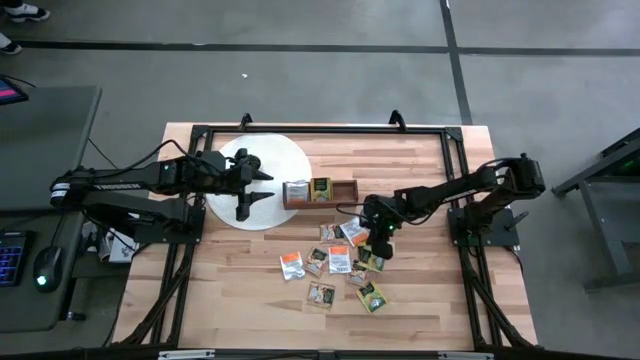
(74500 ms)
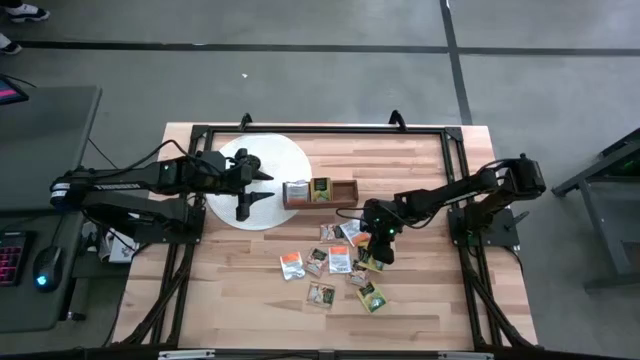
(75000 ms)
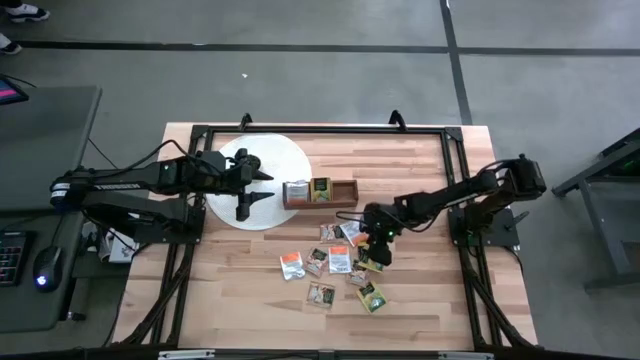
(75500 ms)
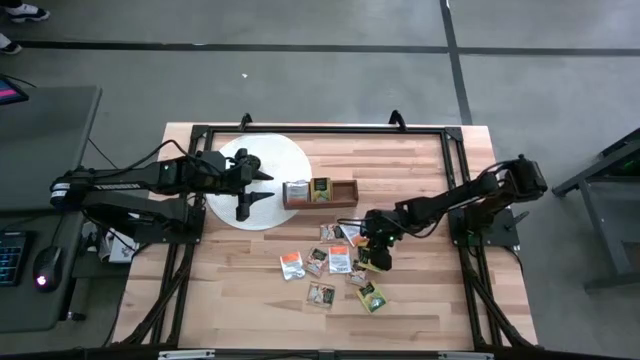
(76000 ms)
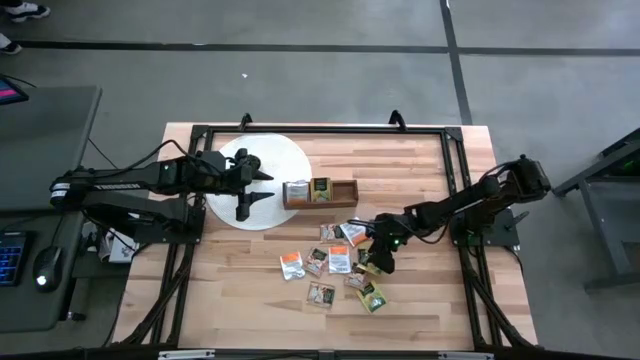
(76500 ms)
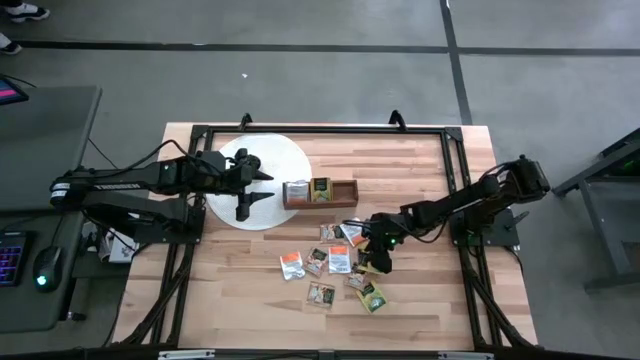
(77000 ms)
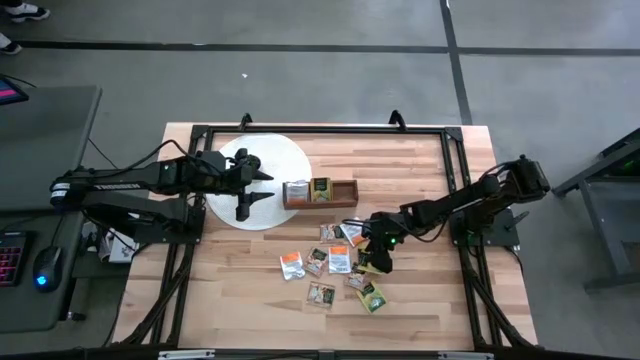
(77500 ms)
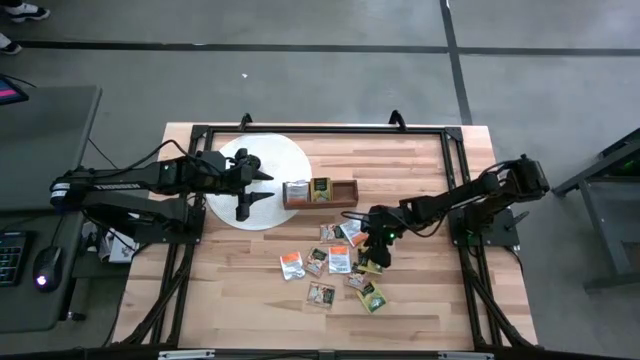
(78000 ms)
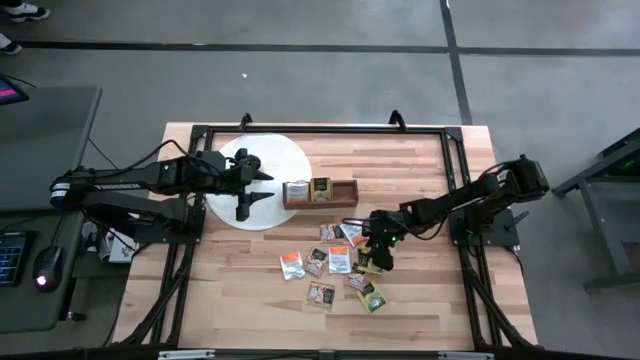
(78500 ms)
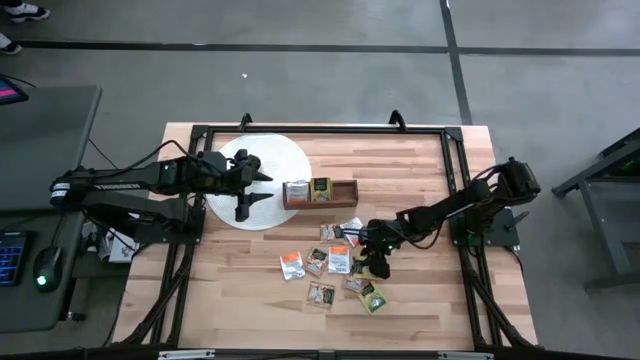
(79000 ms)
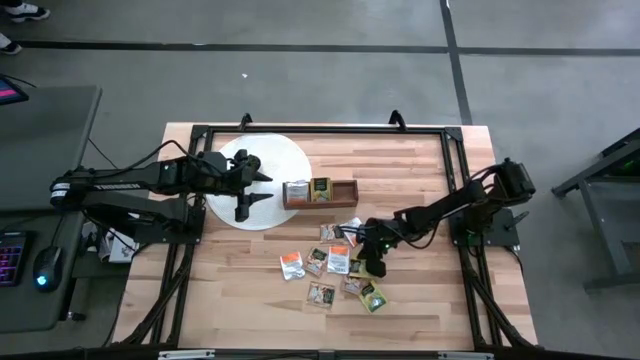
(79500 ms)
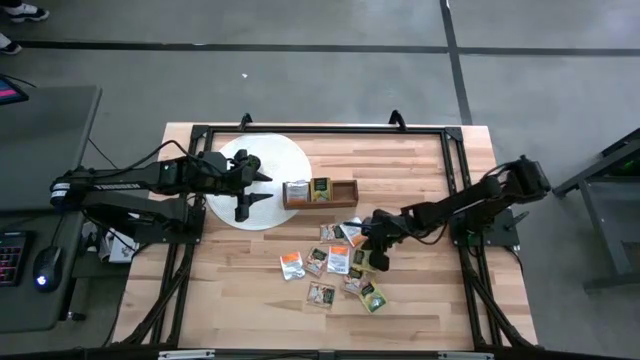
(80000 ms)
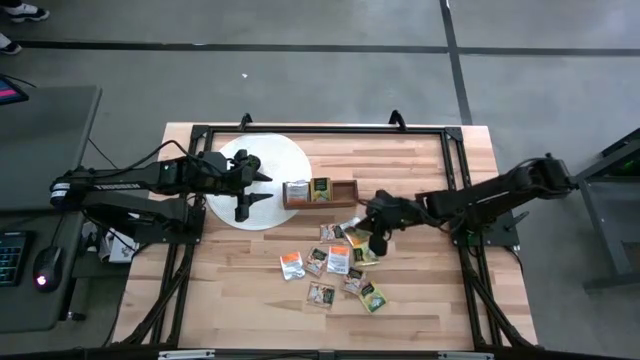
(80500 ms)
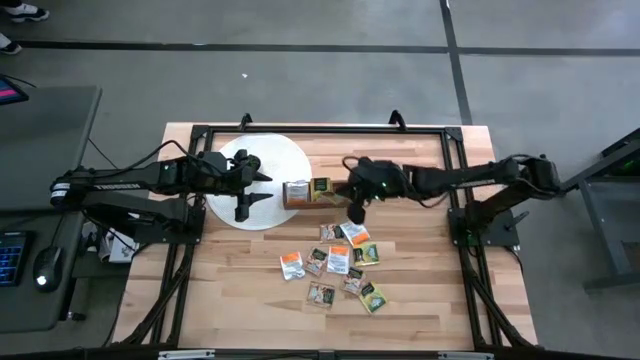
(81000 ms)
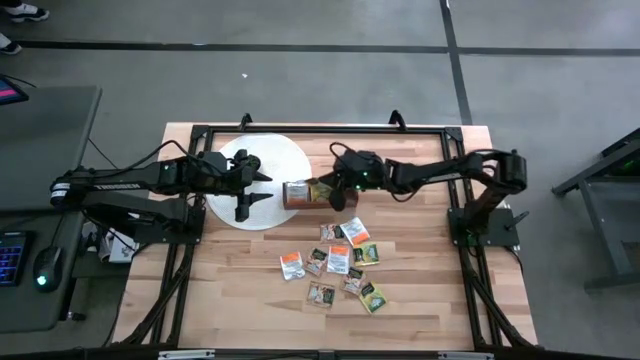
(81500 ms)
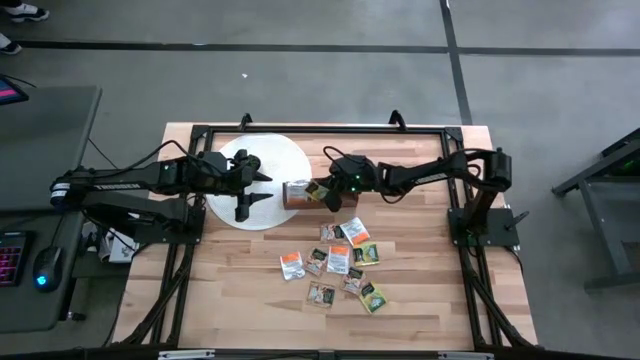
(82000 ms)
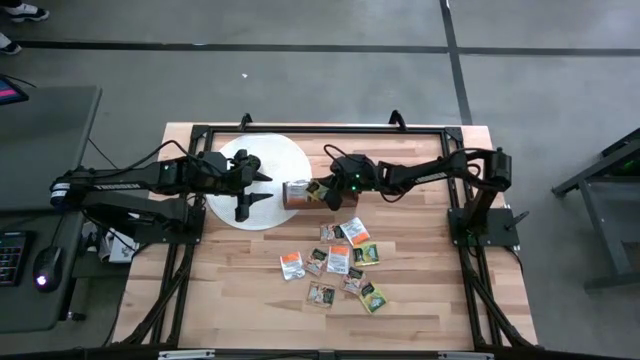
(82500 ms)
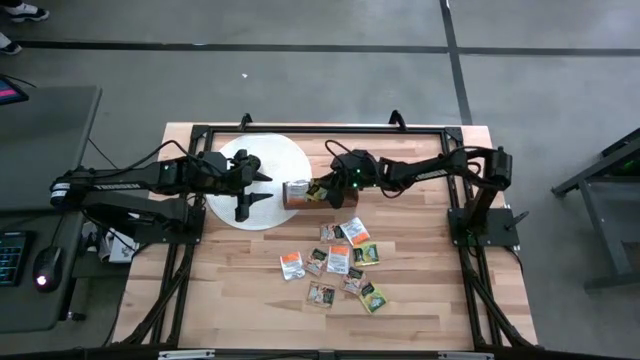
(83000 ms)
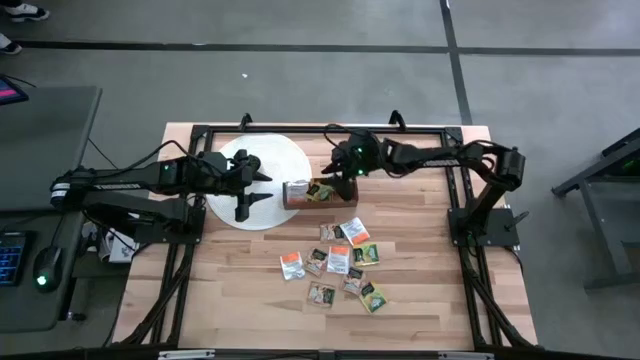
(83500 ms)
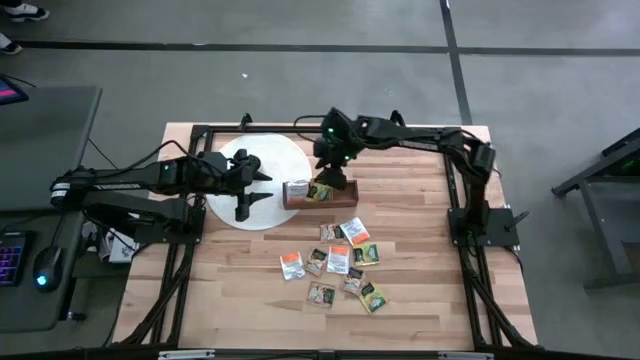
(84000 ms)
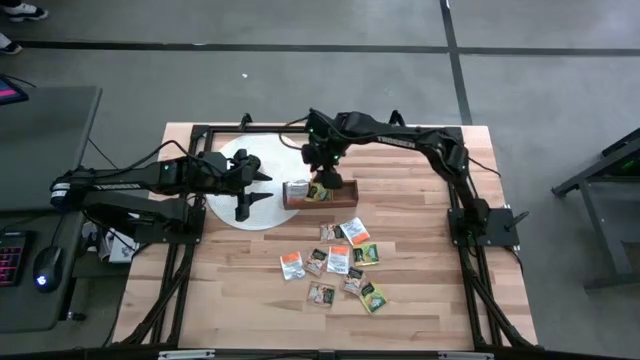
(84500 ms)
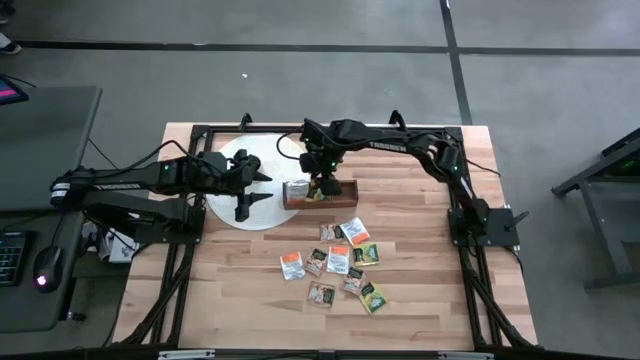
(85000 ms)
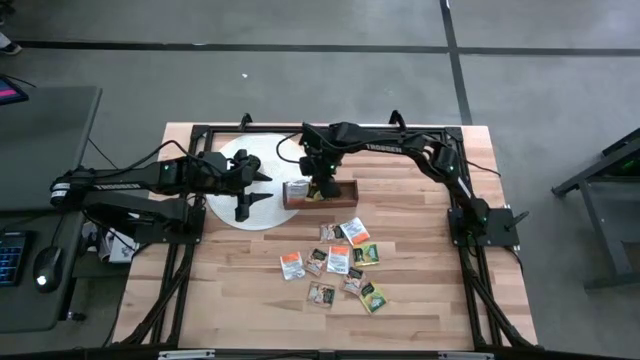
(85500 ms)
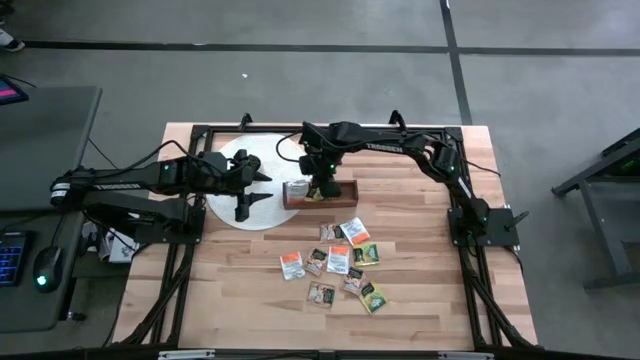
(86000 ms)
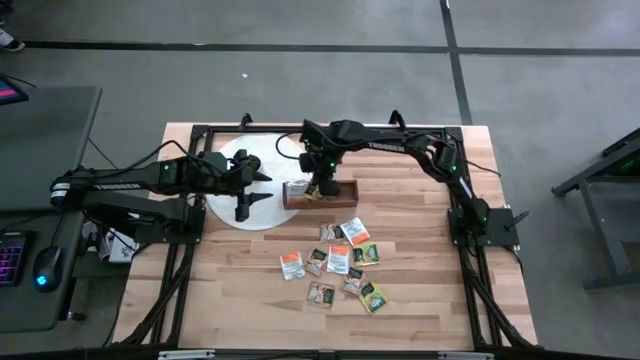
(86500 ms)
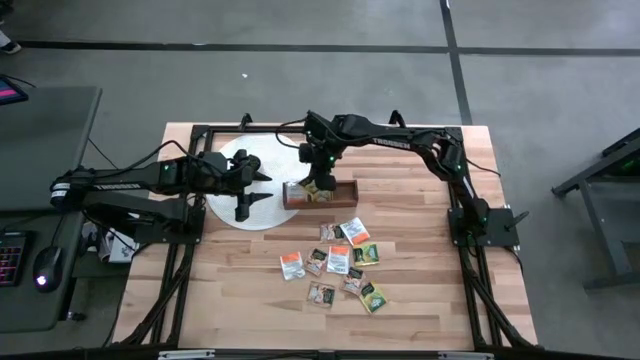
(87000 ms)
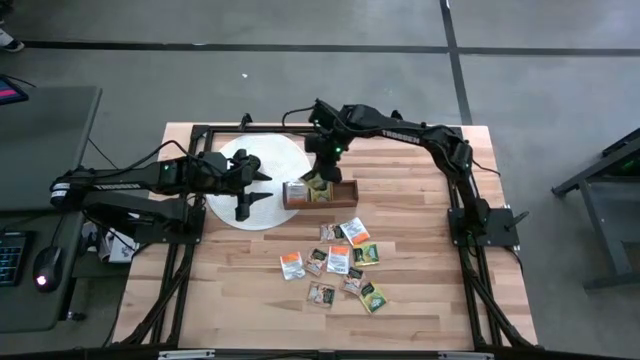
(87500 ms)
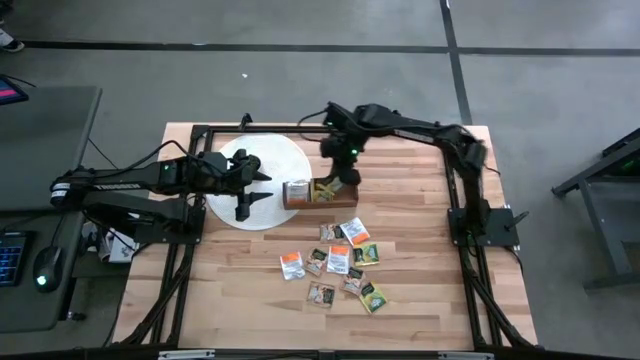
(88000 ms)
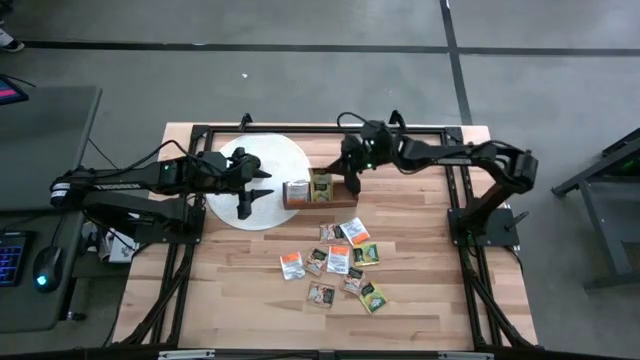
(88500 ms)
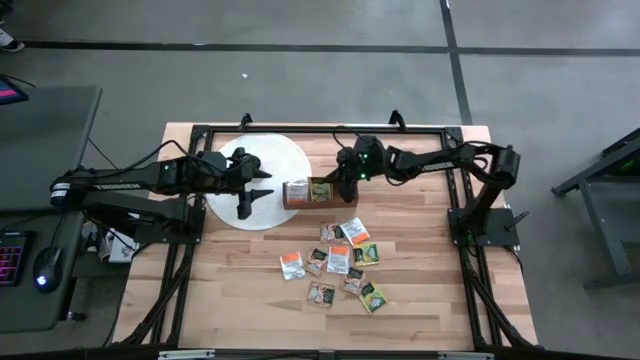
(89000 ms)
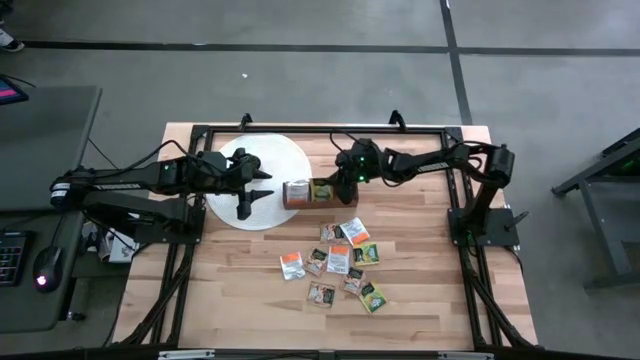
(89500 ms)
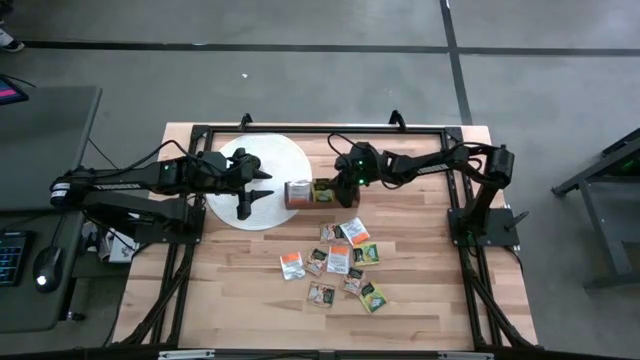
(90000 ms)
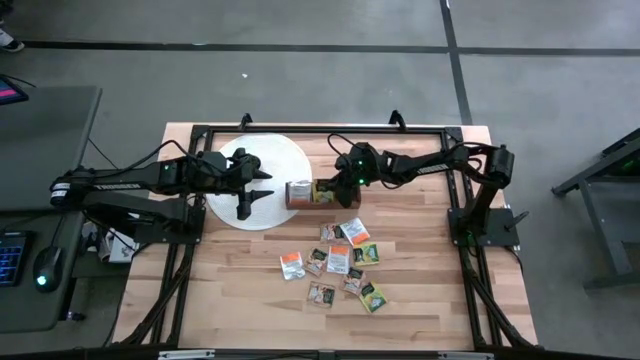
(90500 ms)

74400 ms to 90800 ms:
Task: Pick & Place Tea
Put the yellow tea bag into the middle section of the wooden organizer

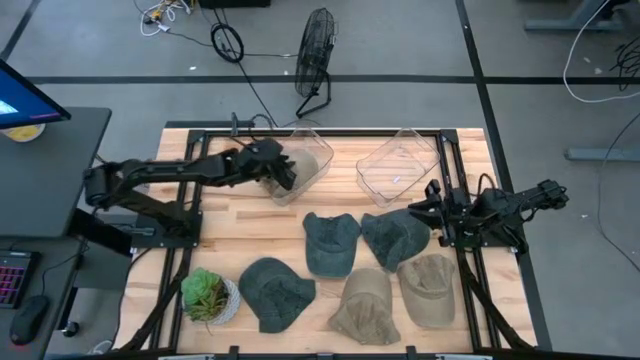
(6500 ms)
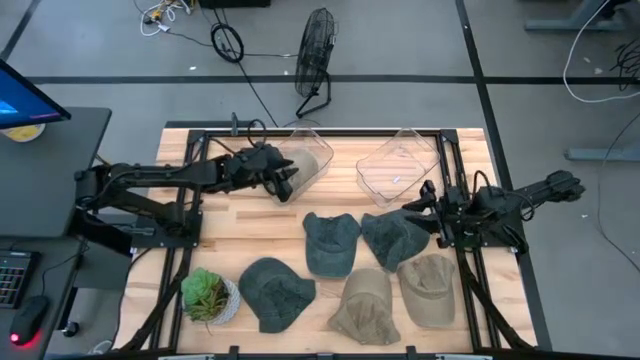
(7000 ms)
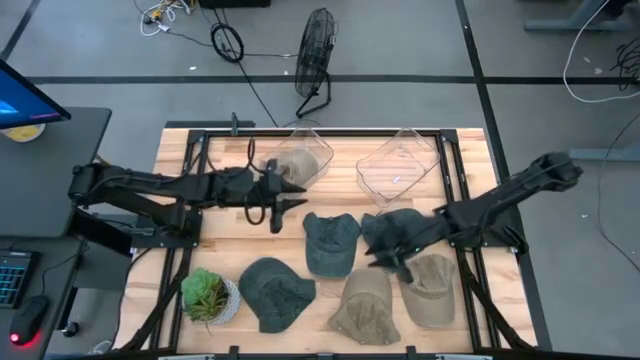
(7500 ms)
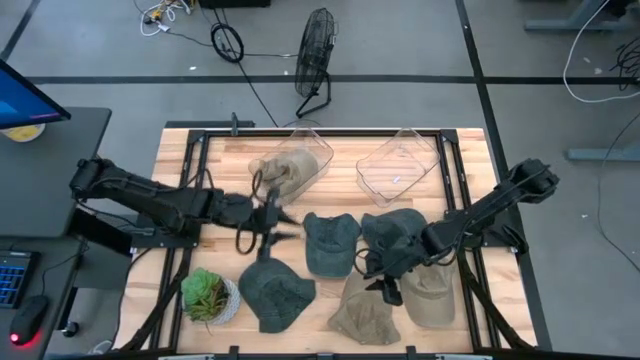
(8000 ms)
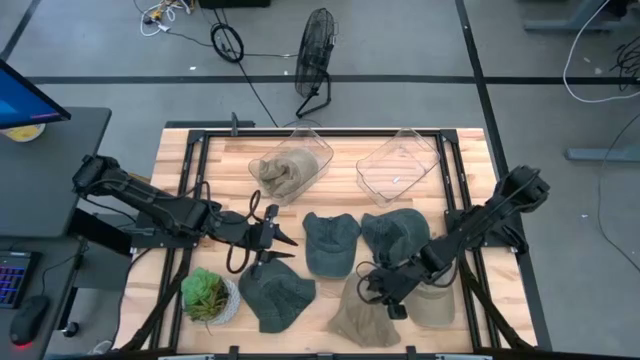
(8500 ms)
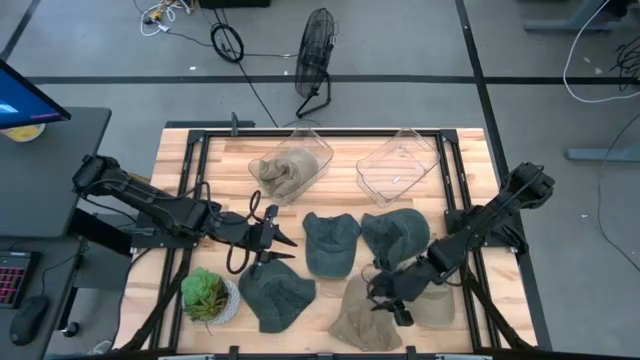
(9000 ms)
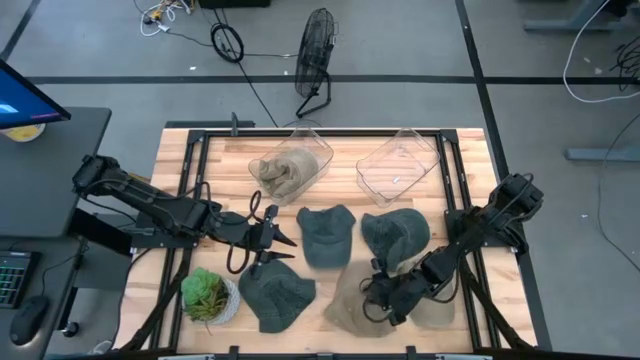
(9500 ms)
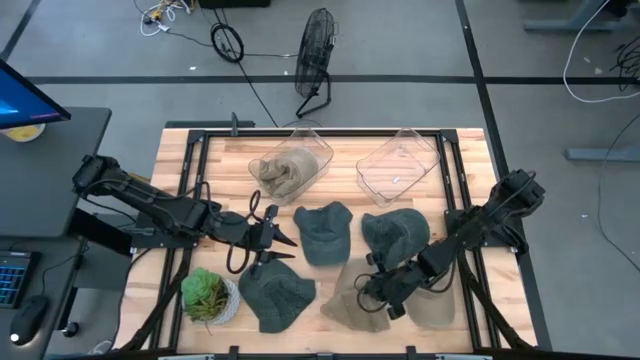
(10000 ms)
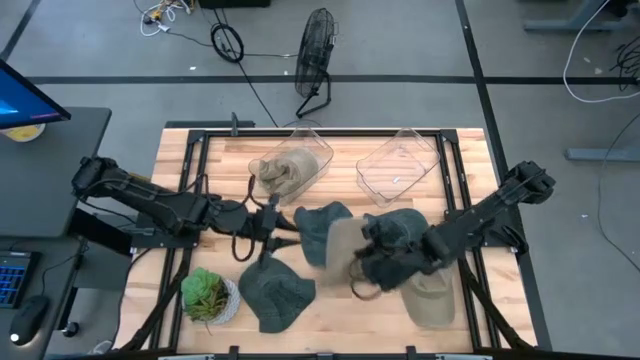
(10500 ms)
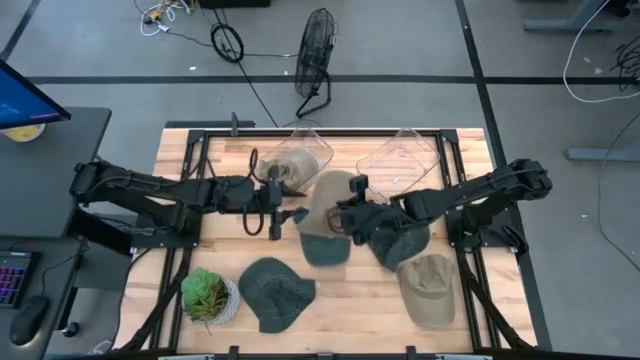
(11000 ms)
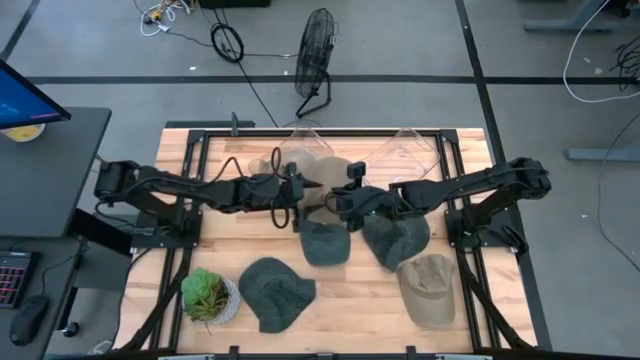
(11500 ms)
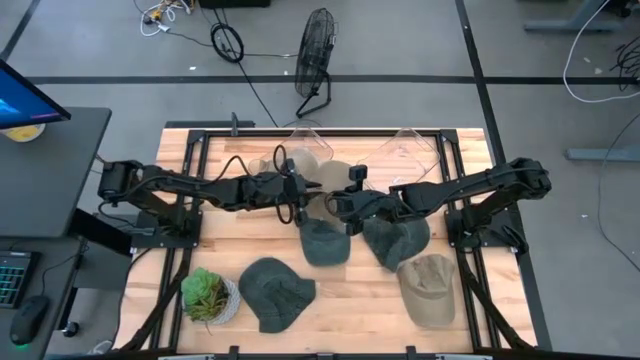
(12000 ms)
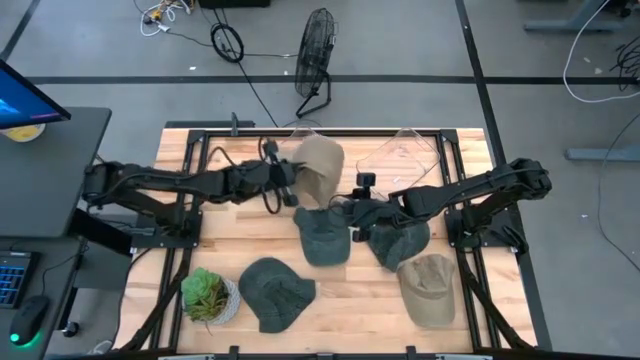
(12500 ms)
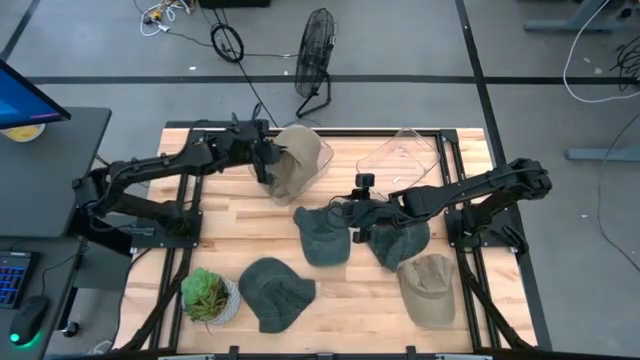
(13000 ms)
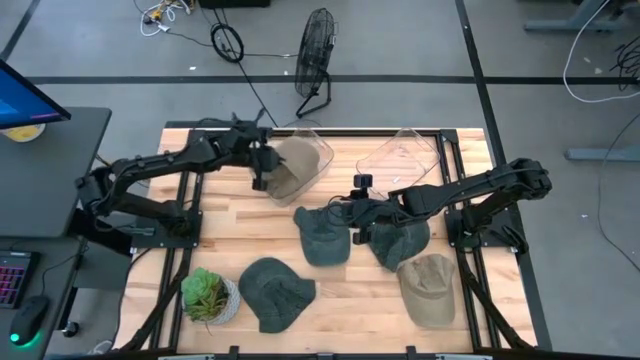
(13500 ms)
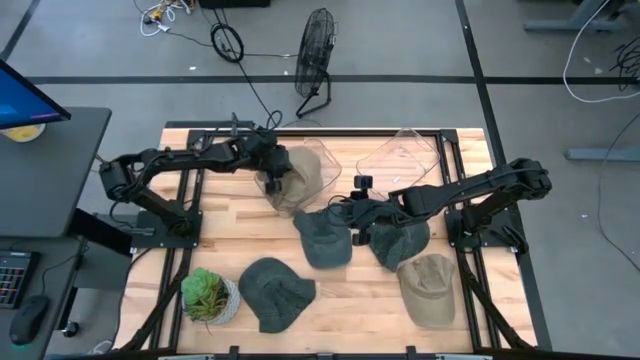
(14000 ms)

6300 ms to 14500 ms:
Task: Pick & Place hat
Put the left brown cap into the left transparent bin
